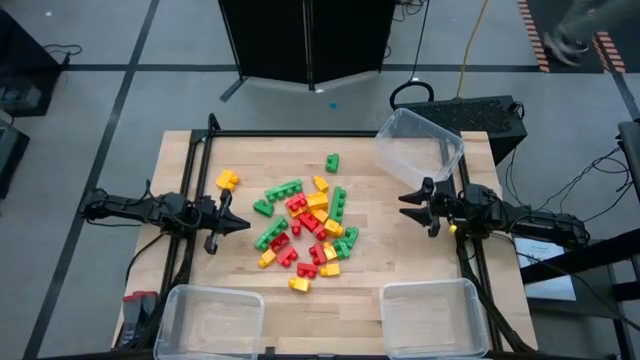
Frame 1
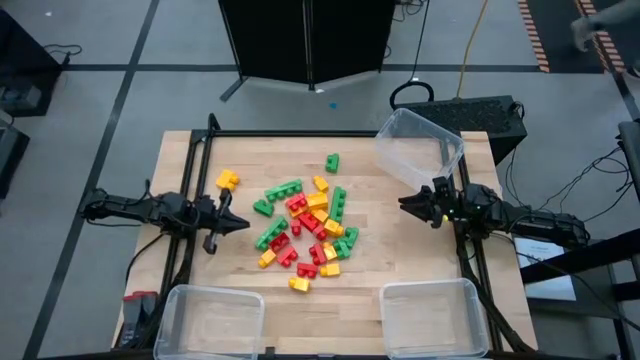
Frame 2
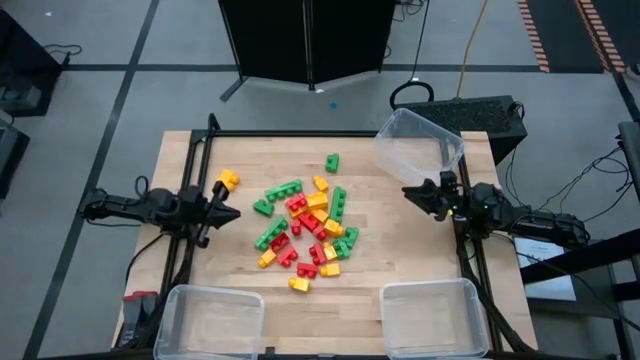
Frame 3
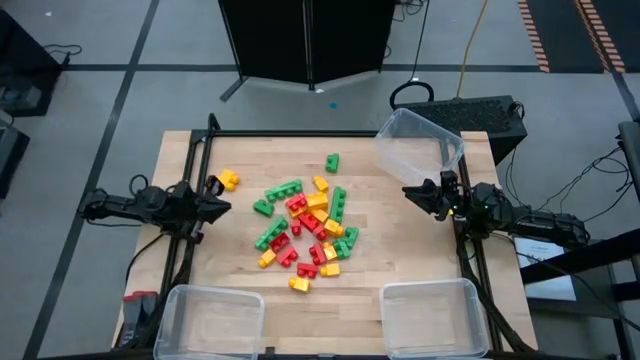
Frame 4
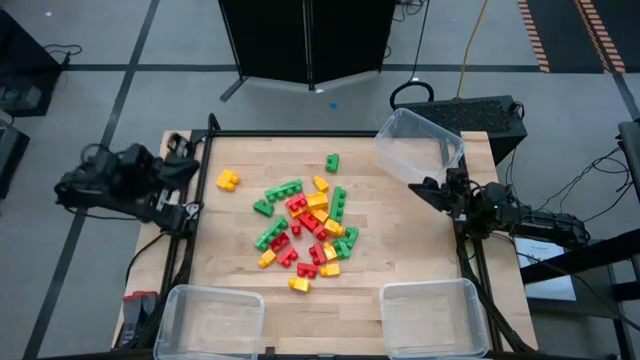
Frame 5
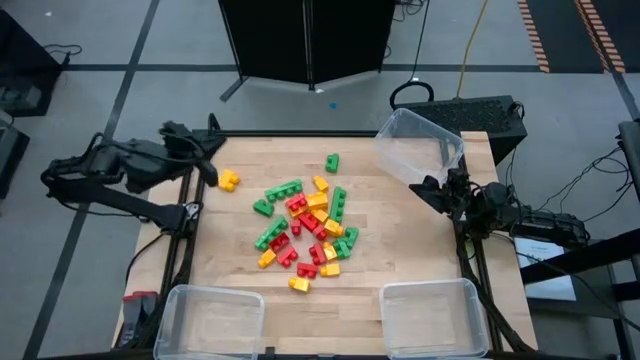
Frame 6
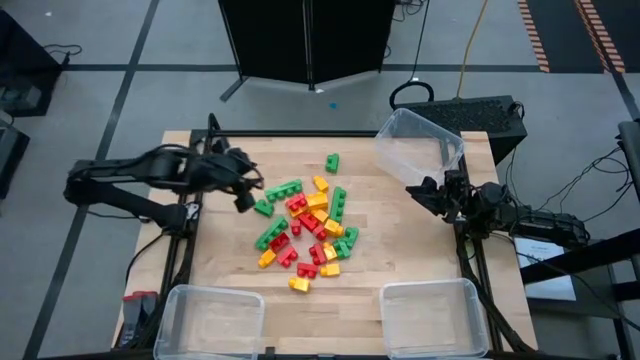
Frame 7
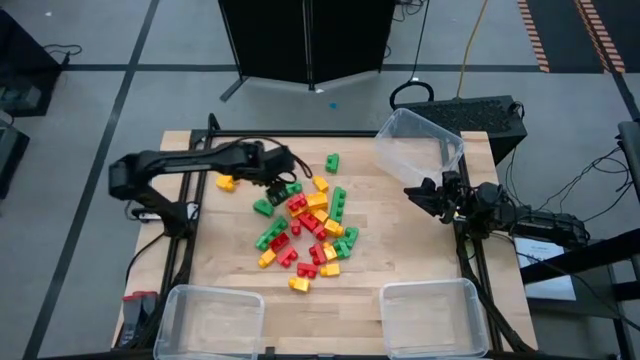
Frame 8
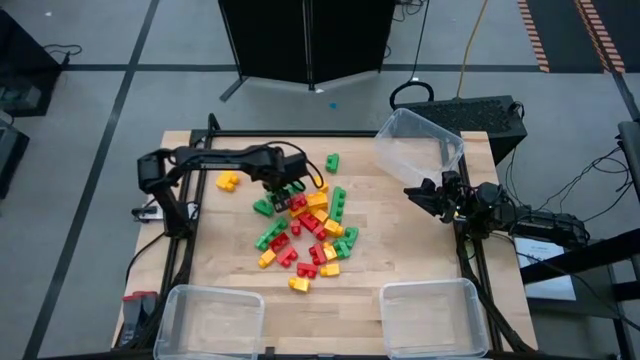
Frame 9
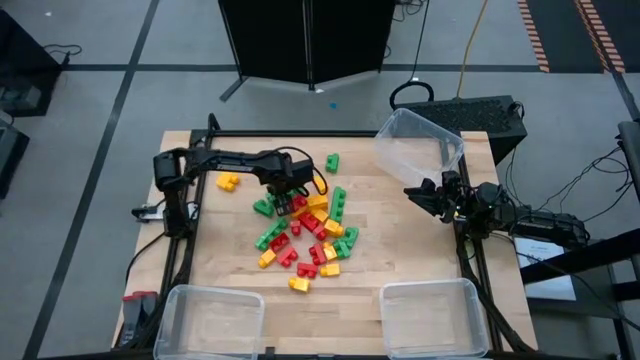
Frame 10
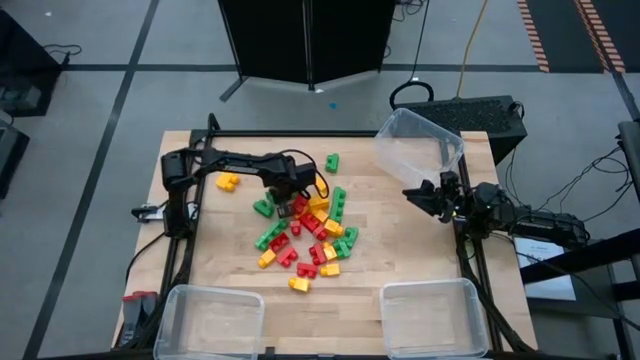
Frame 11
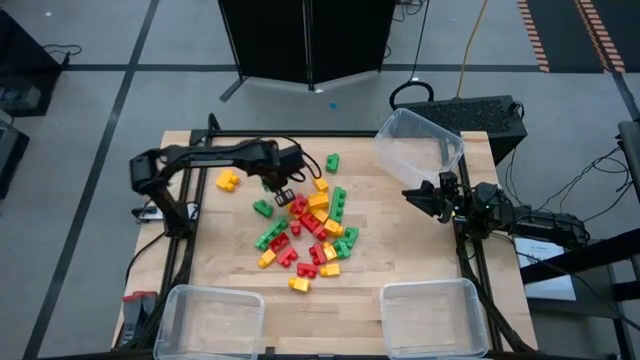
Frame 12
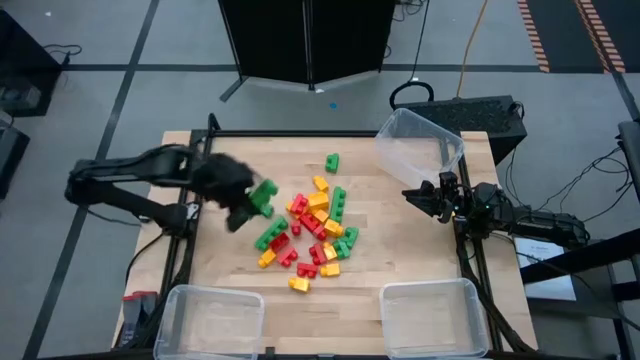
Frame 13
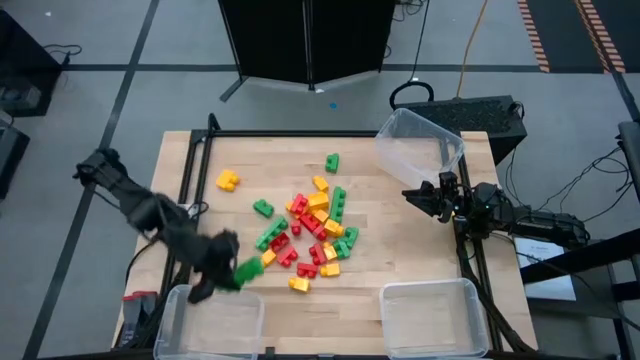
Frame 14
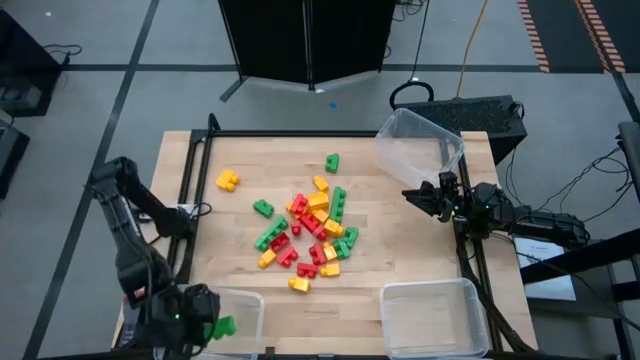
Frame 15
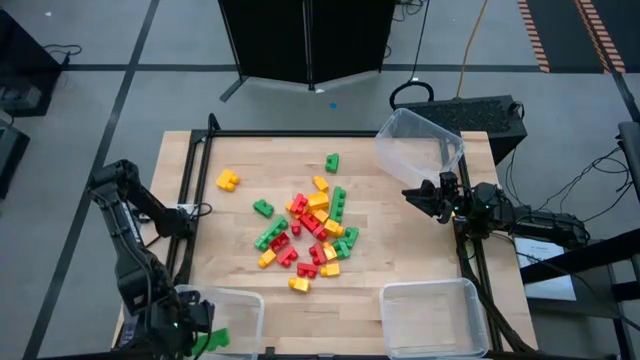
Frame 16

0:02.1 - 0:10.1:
Task: Sort blocks
Put the green game piece into the bottom left transparent bin

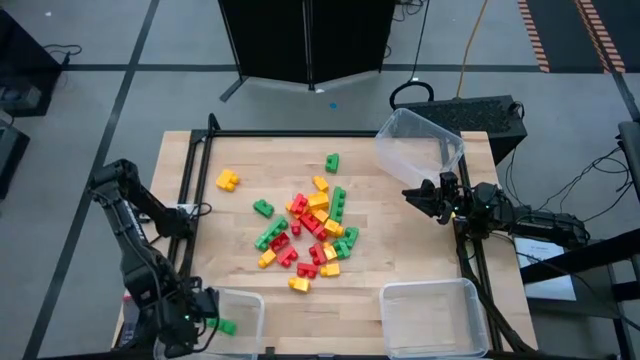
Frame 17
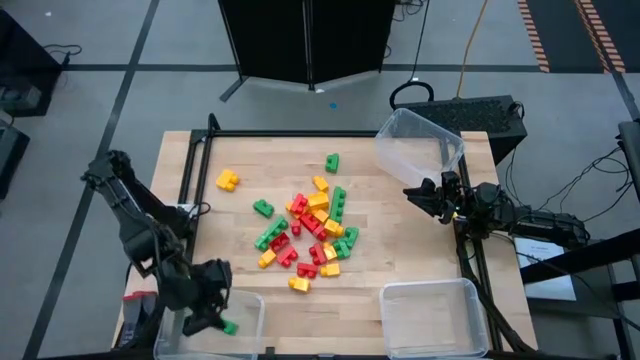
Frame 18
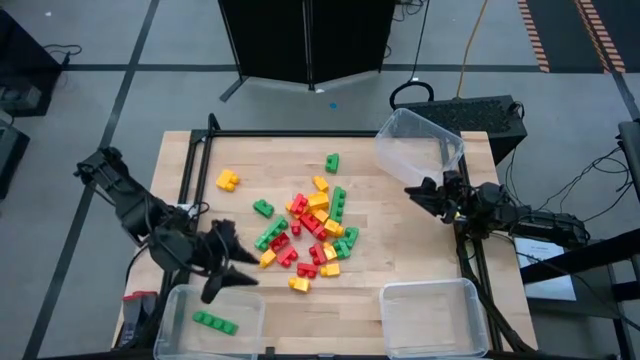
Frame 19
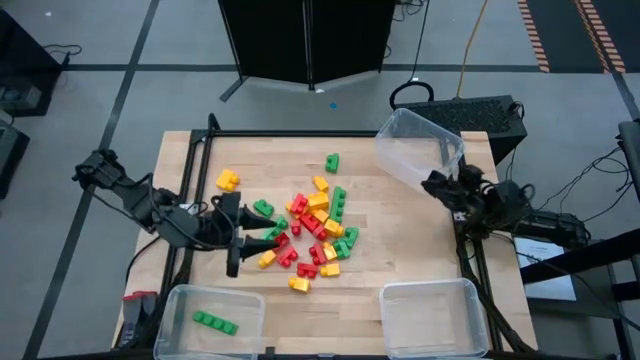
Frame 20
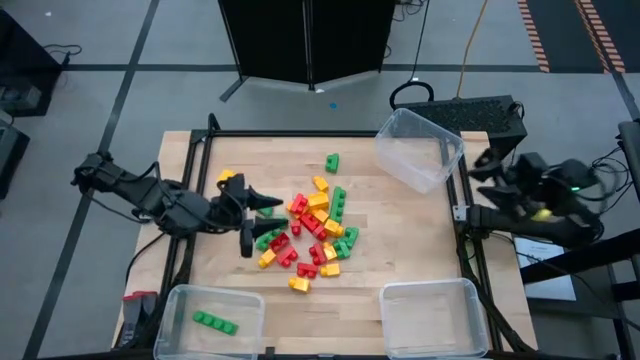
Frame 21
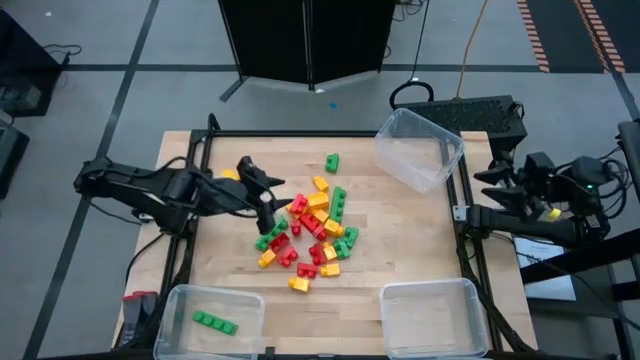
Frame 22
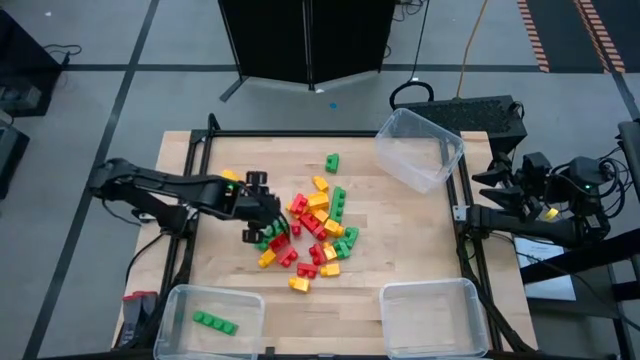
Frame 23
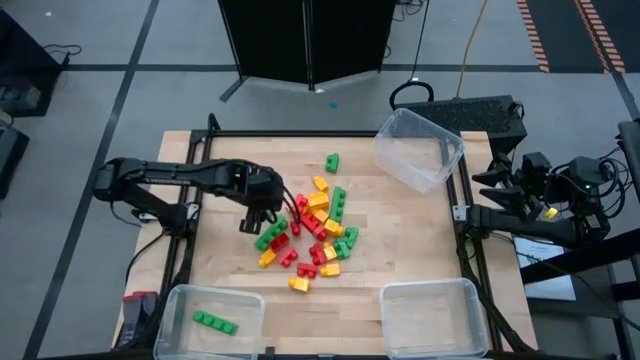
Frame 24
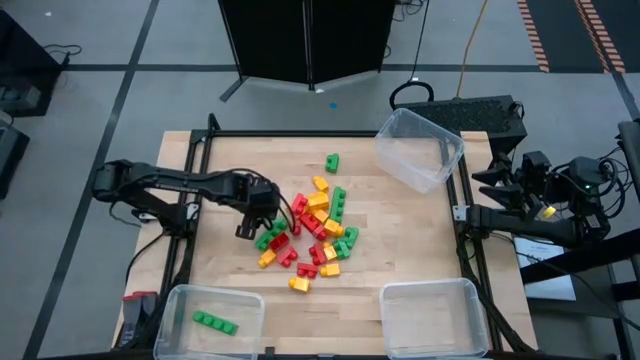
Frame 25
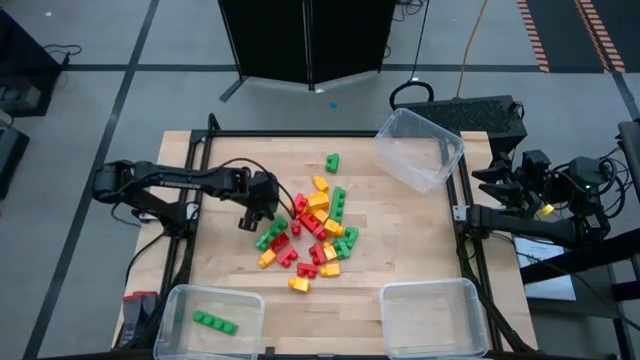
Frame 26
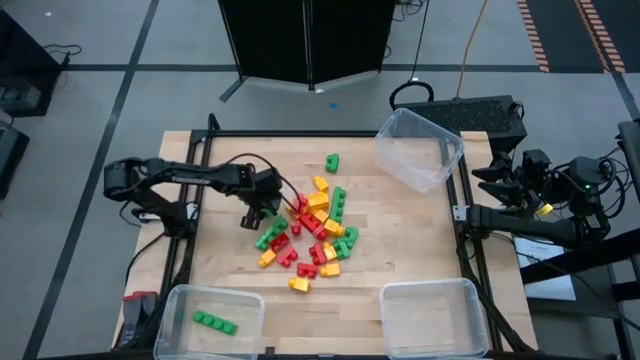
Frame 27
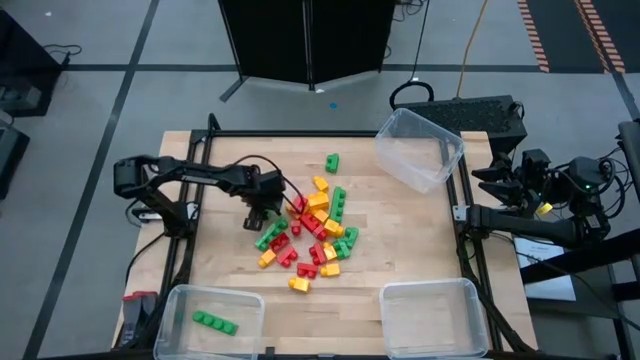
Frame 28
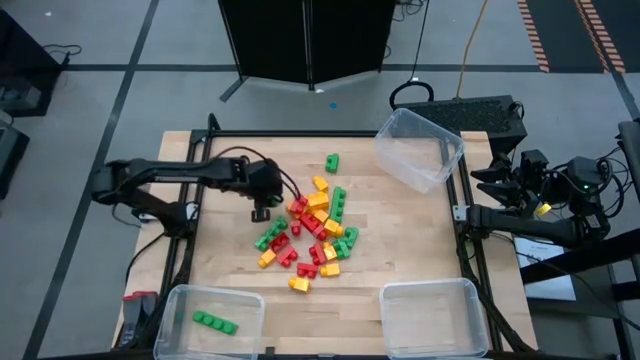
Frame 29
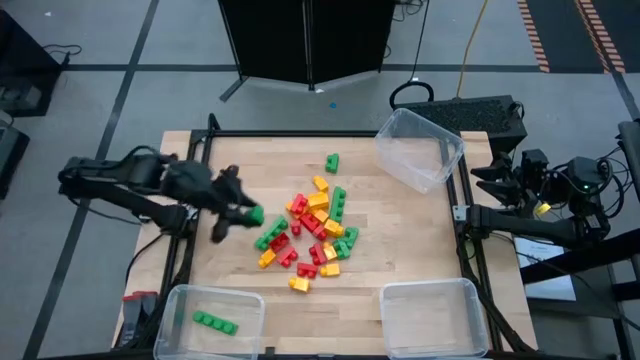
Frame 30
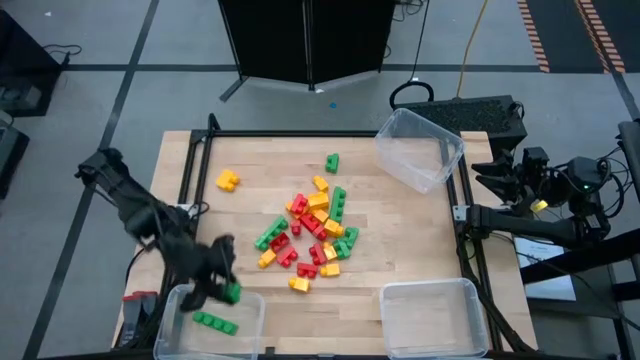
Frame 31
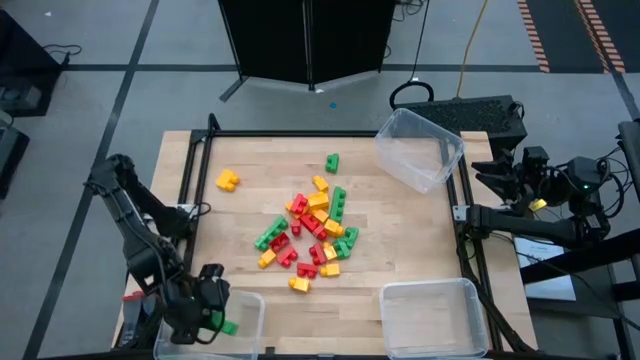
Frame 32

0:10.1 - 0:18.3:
Put the green game piece into the bottom left transparent bin

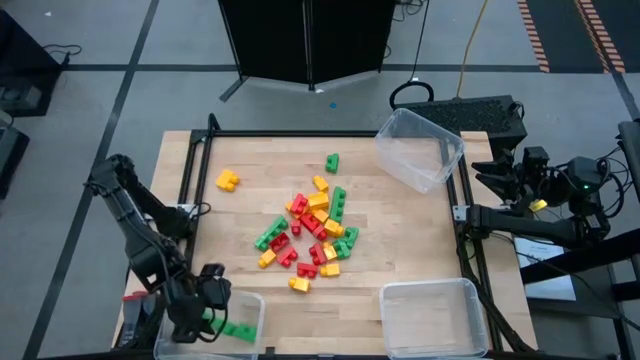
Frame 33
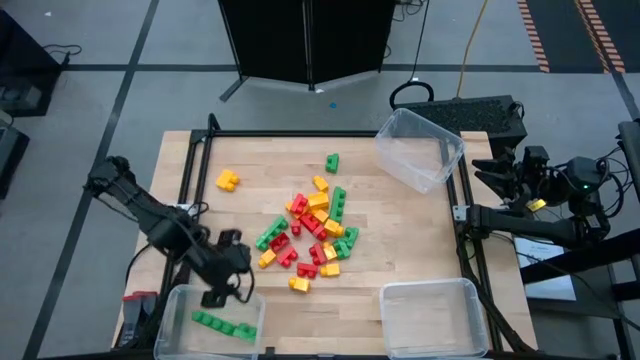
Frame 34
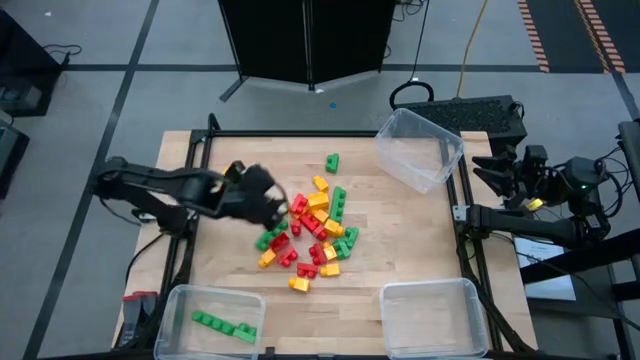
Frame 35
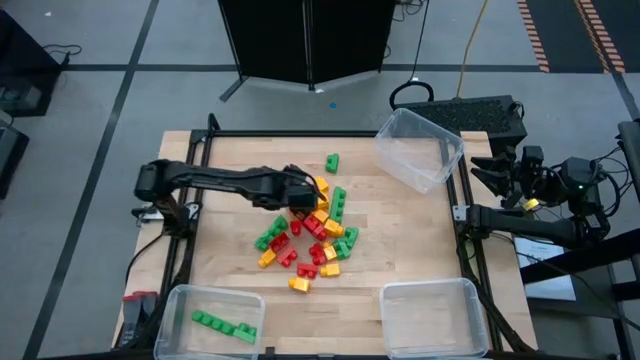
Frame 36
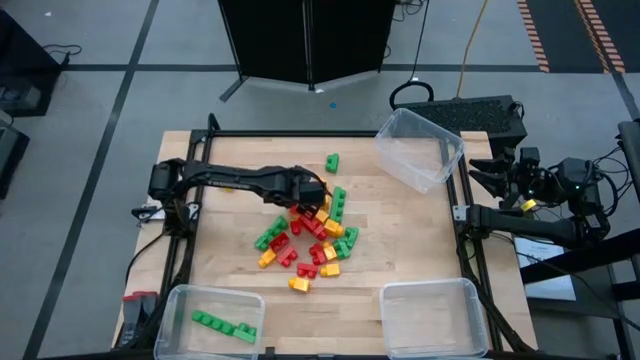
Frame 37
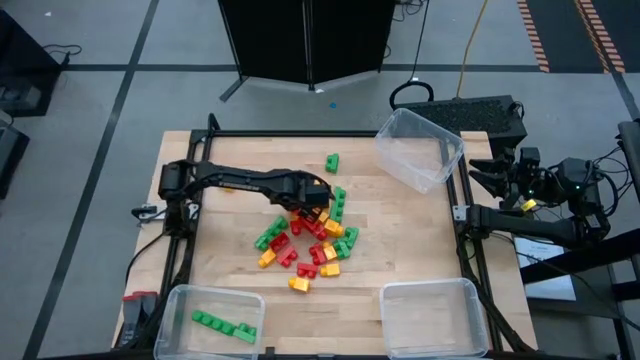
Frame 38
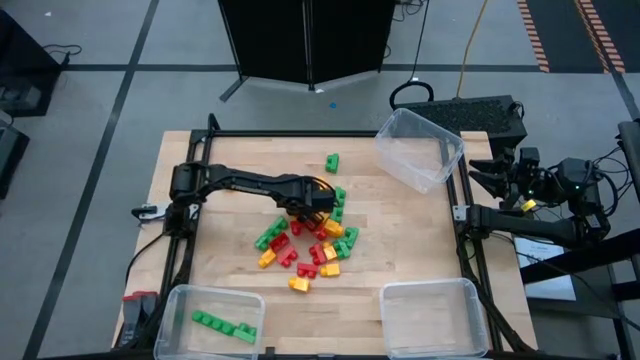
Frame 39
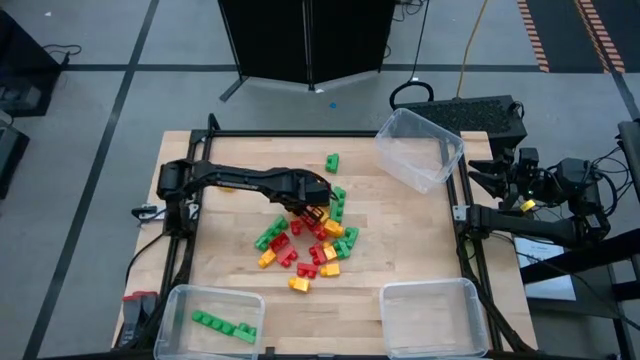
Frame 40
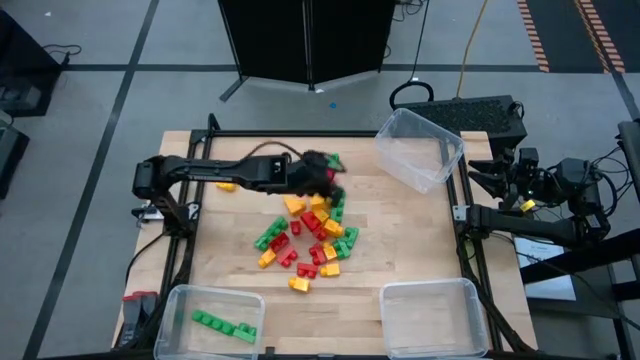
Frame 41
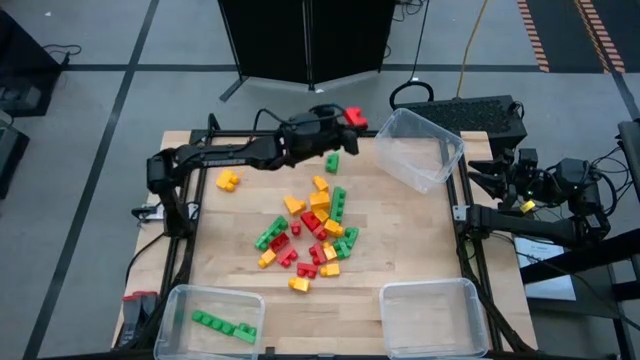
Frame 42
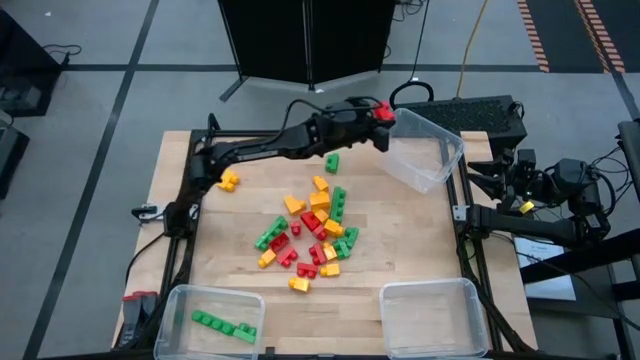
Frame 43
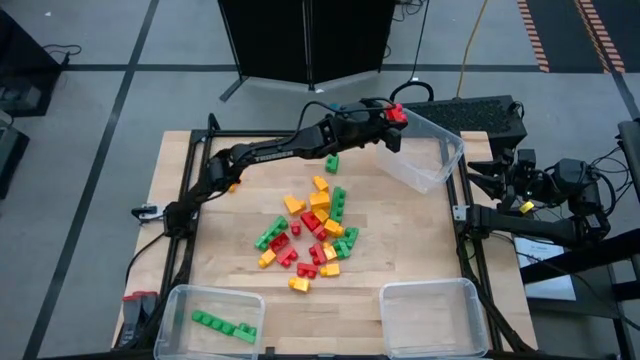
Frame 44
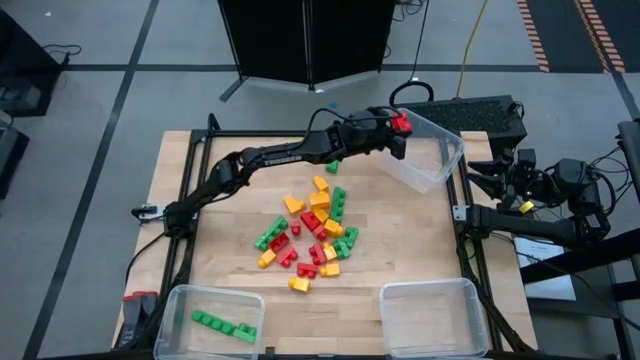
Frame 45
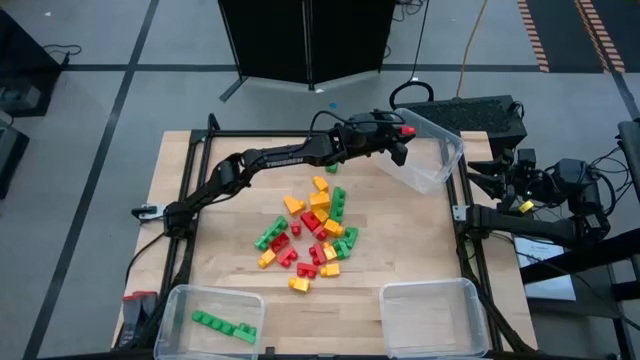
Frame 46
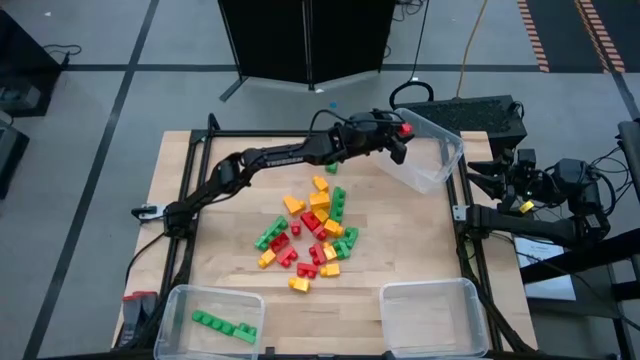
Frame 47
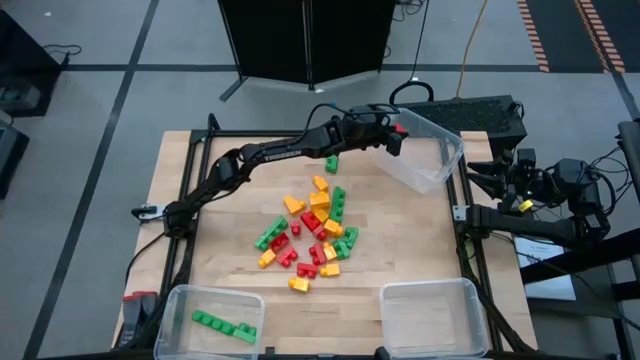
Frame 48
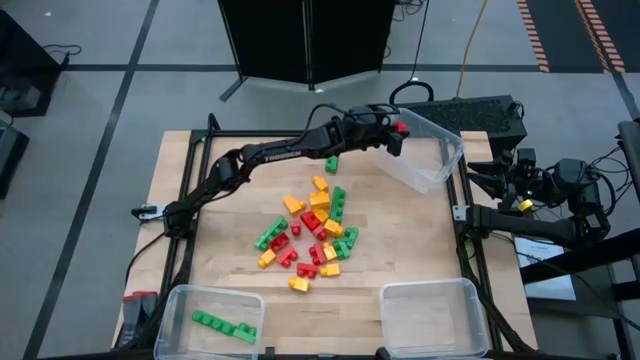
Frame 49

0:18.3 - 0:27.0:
Put the red game piece into the top transparent bin
